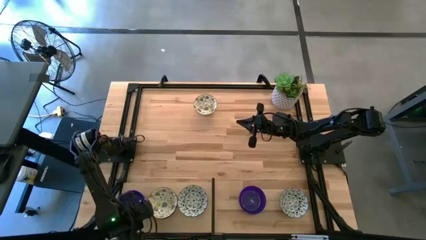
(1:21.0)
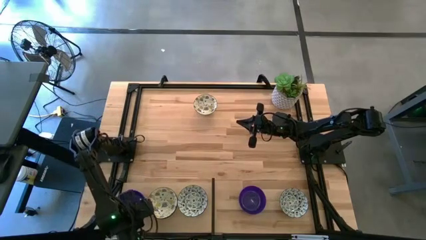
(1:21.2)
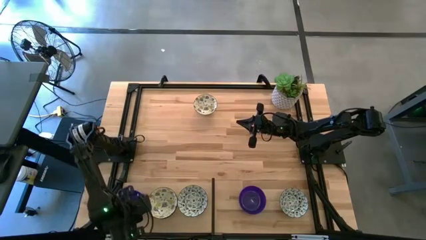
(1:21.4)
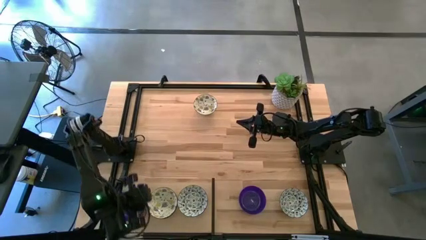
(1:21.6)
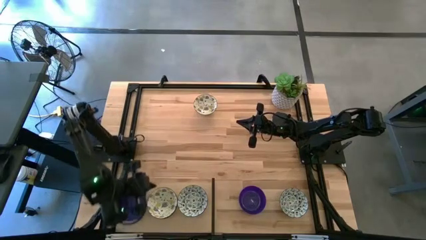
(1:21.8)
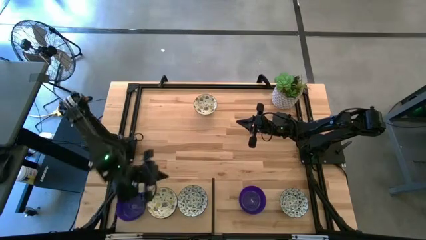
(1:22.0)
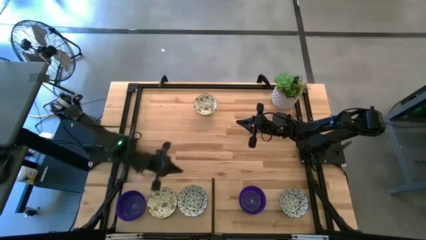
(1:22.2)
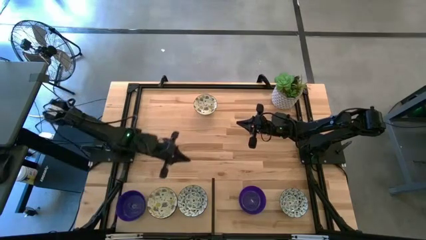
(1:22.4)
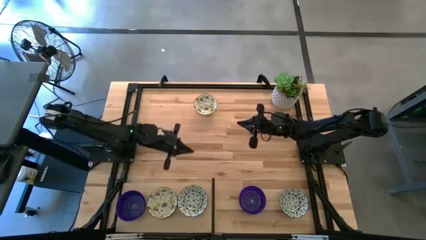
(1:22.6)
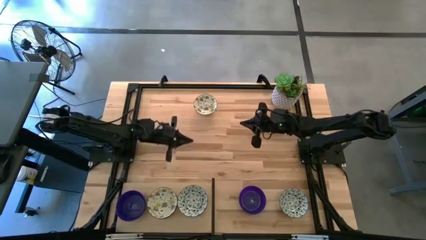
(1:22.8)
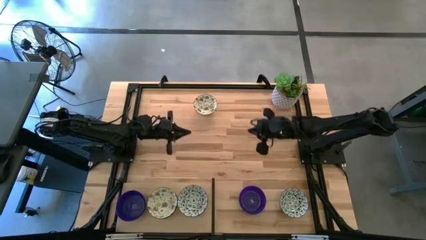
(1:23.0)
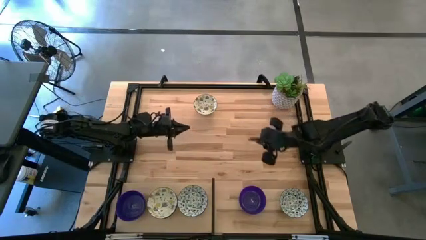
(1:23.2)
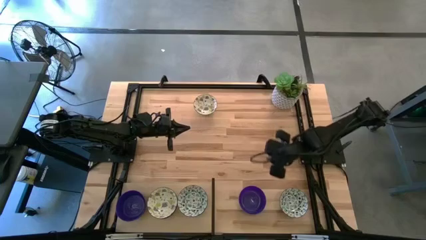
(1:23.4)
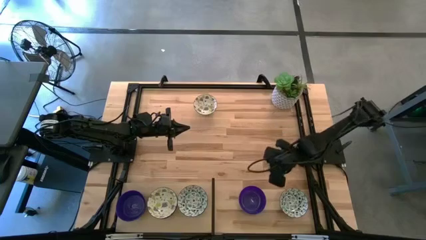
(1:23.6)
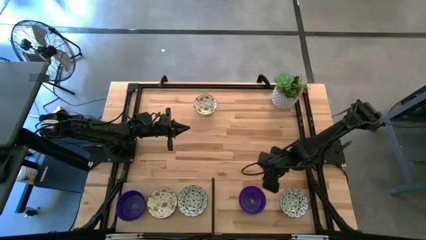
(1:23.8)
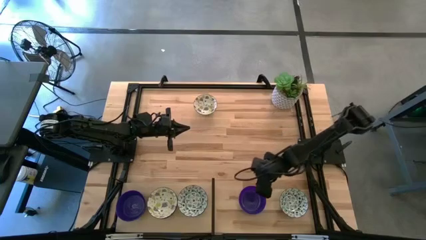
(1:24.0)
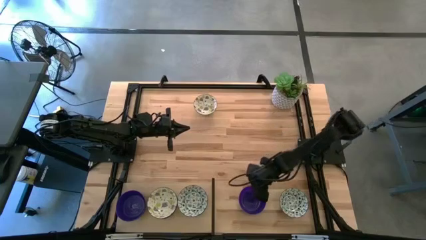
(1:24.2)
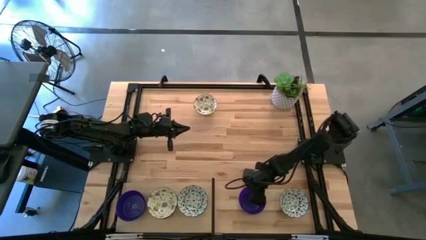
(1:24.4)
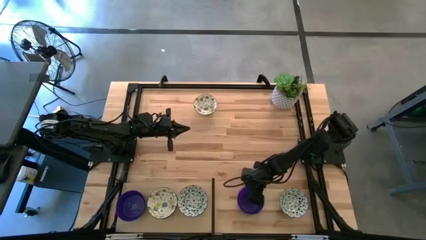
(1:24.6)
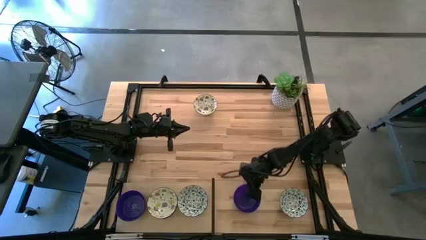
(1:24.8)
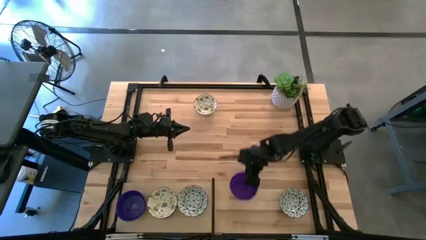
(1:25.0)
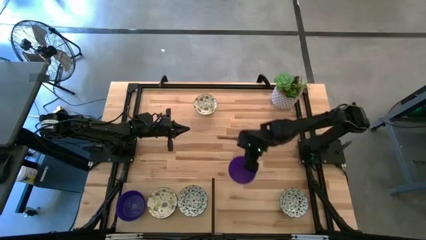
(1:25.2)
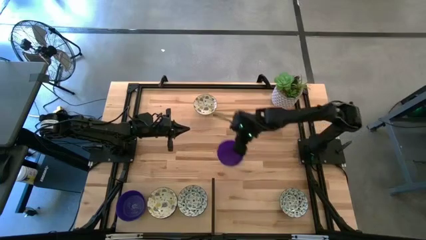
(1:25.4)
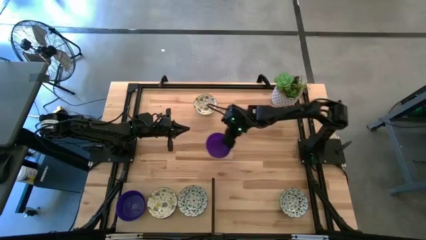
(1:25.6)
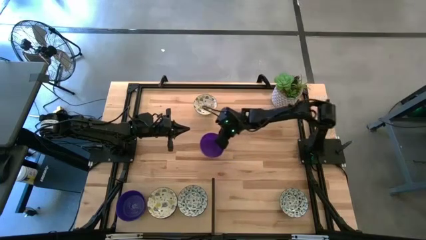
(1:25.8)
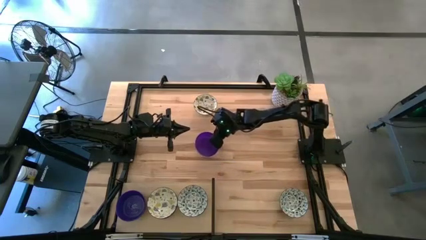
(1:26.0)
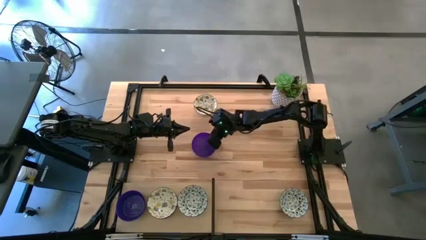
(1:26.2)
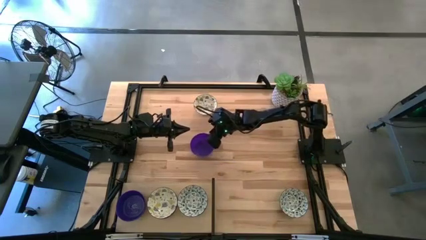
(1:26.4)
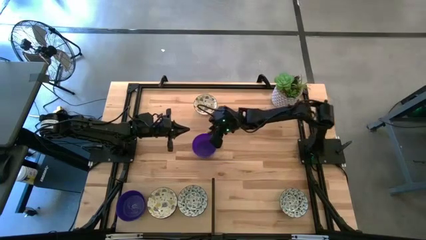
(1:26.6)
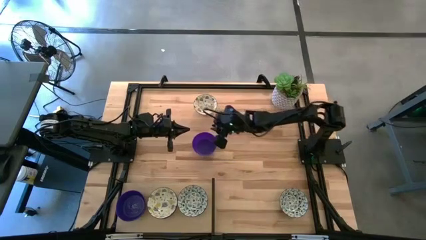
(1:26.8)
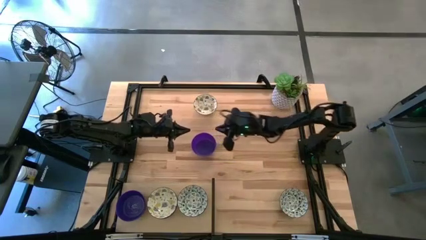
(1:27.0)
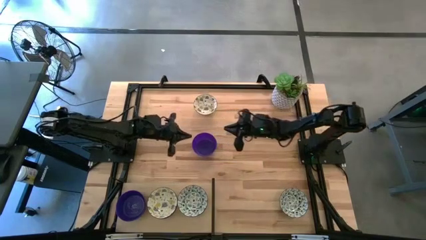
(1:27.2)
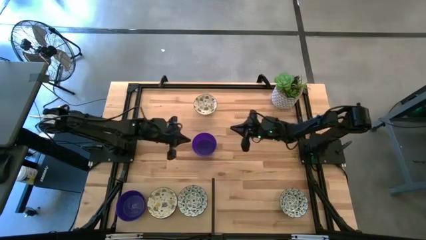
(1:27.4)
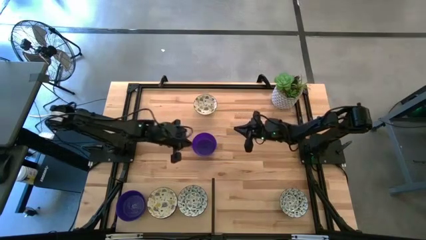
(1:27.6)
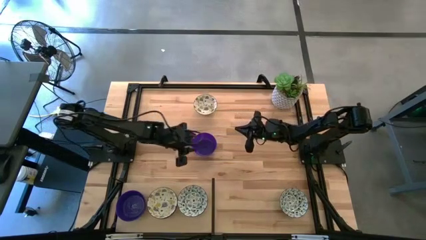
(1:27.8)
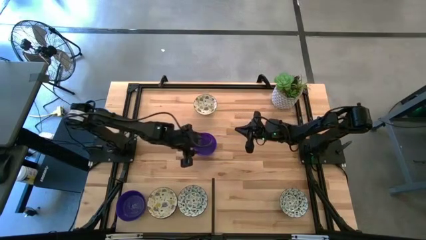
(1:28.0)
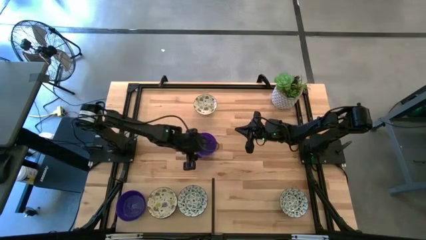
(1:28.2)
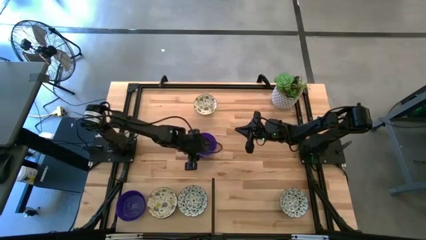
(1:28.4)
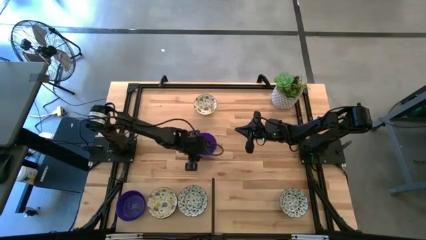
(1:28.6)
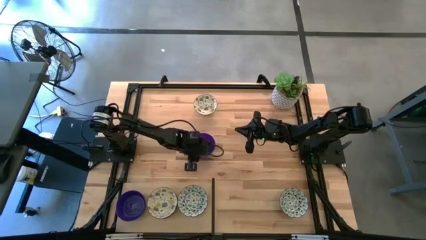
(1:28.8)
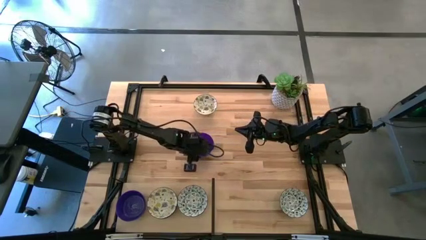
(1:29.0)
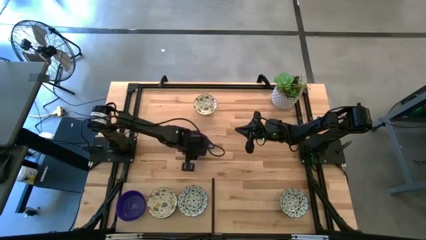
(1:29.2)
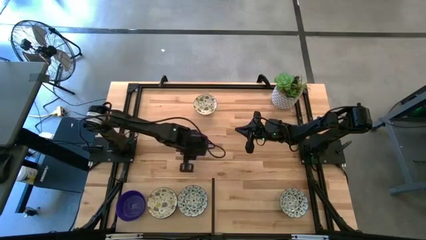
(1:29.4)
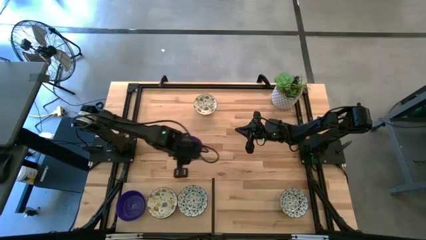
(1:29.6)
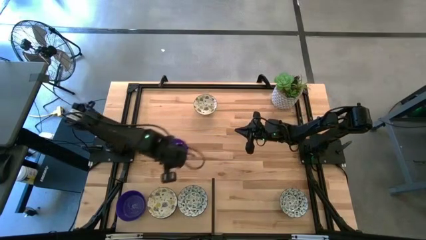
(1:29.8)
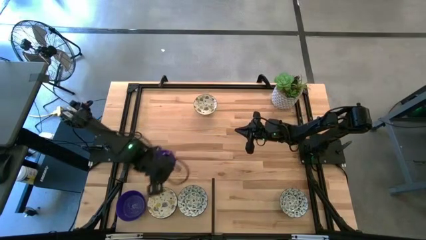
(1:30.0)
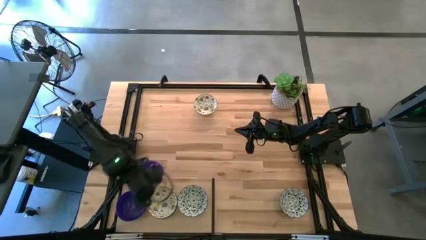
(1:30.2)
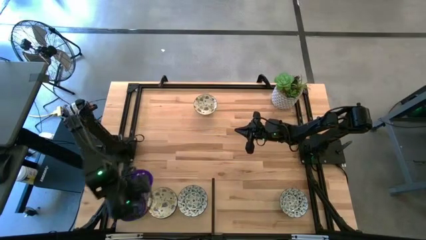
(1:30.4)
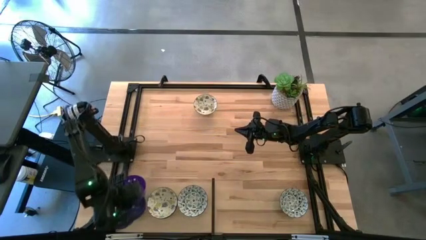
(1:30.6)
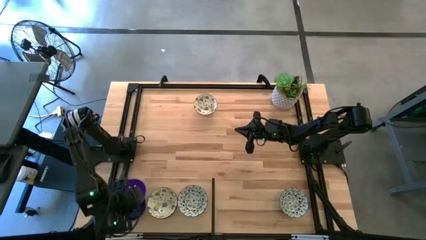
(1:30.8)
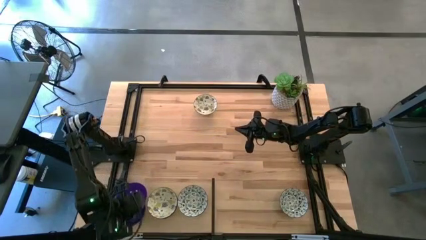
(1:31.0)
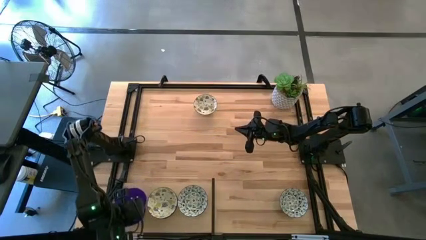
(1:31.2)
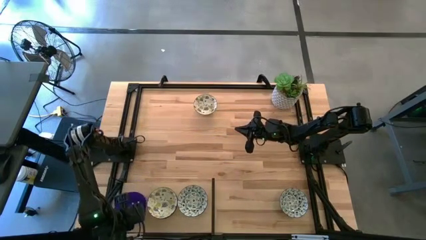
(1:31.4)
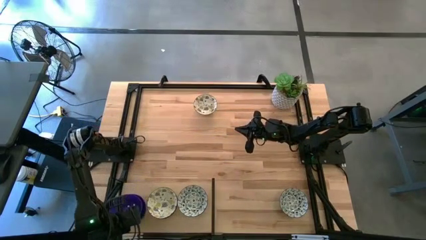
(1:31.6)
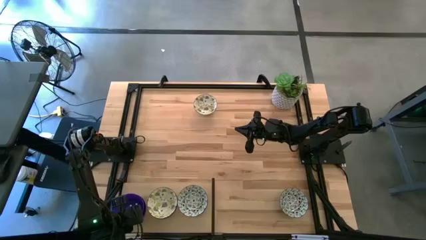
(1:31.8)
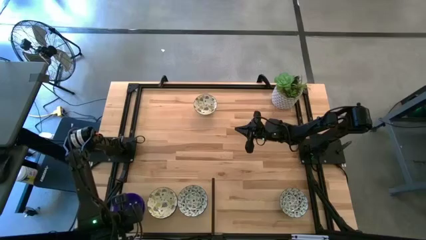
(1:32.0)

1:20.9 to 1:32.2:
Task: Pick & Place Mini bowls
Stack the violet bowl on top of the other stacked violet bowls on the shelf

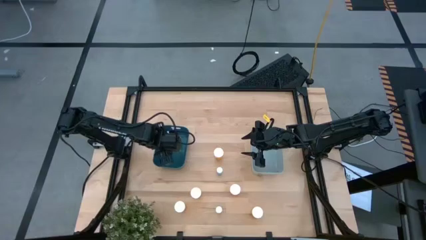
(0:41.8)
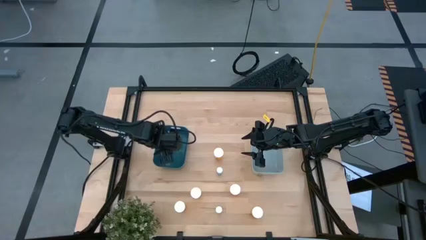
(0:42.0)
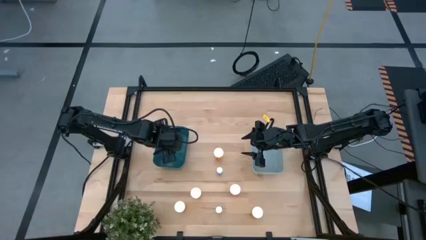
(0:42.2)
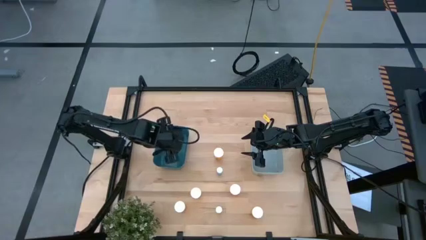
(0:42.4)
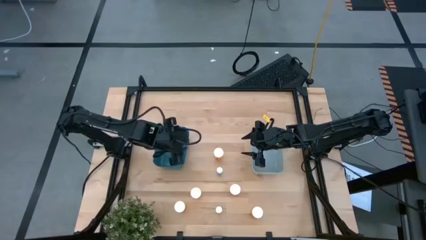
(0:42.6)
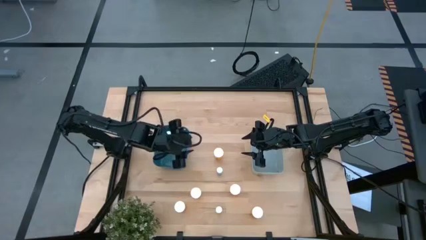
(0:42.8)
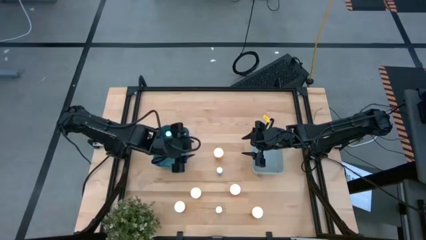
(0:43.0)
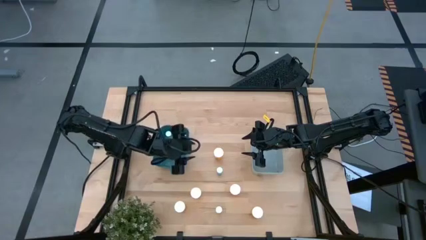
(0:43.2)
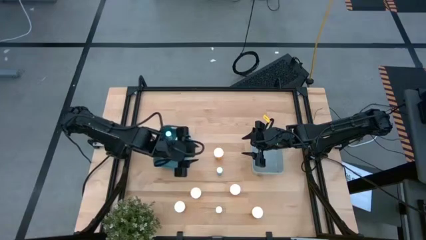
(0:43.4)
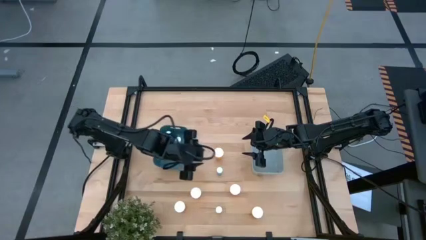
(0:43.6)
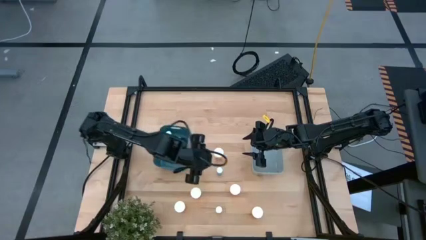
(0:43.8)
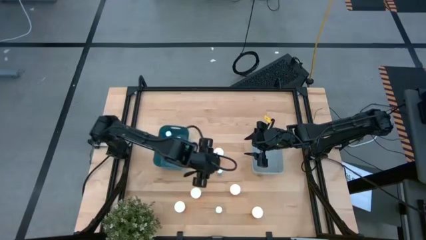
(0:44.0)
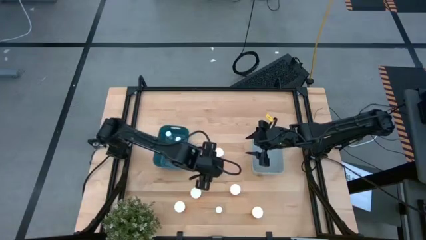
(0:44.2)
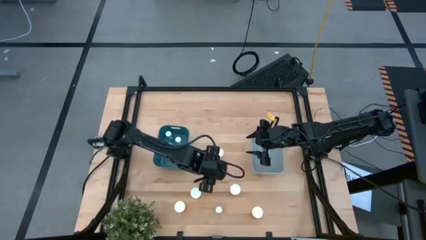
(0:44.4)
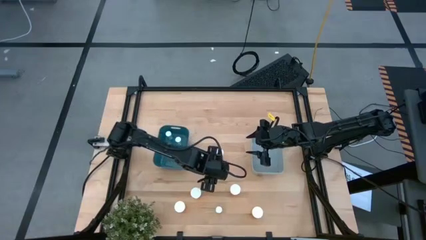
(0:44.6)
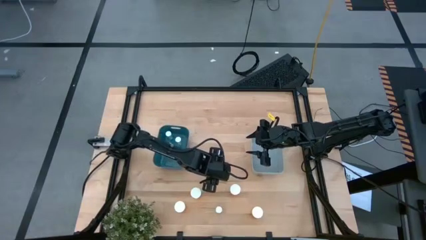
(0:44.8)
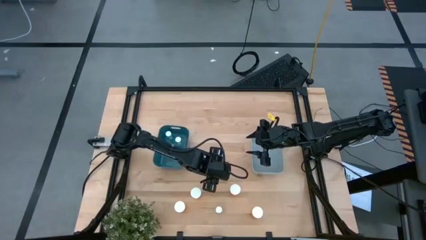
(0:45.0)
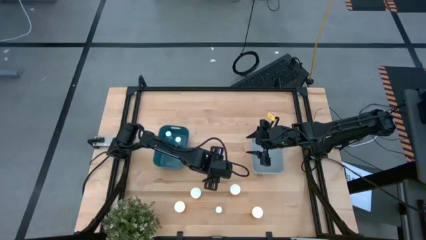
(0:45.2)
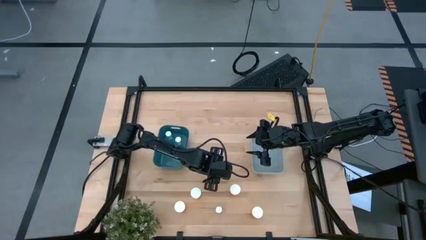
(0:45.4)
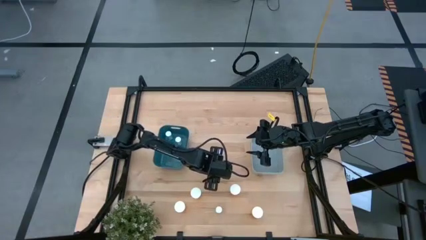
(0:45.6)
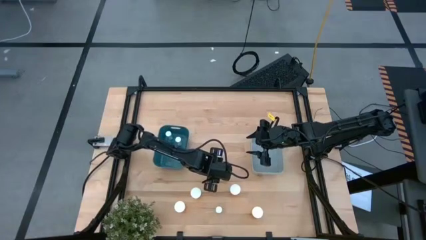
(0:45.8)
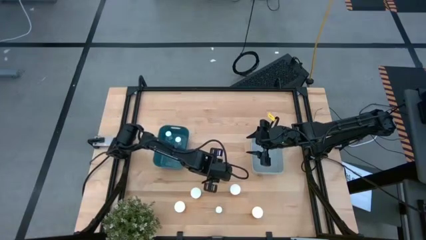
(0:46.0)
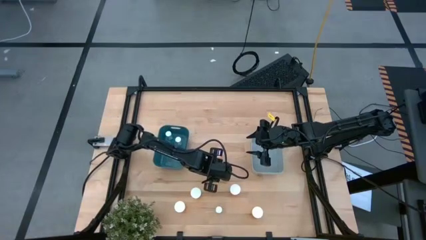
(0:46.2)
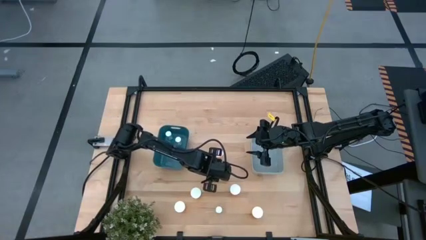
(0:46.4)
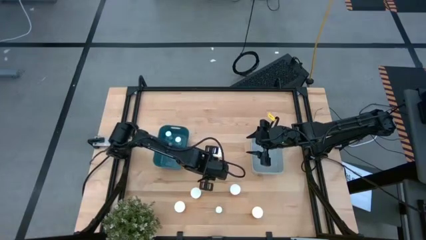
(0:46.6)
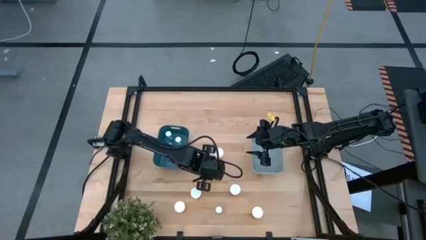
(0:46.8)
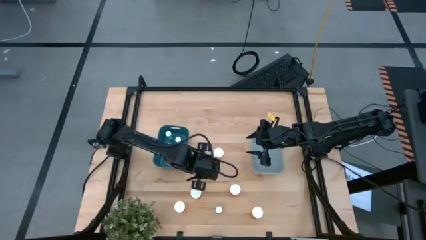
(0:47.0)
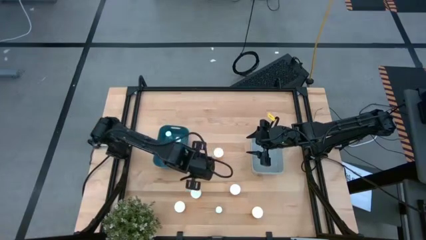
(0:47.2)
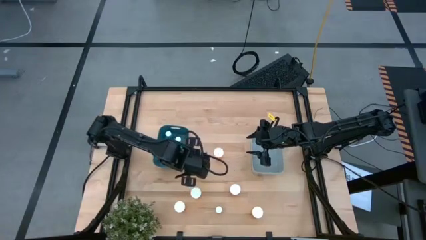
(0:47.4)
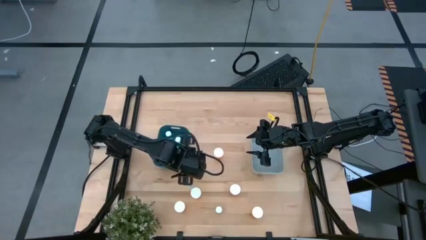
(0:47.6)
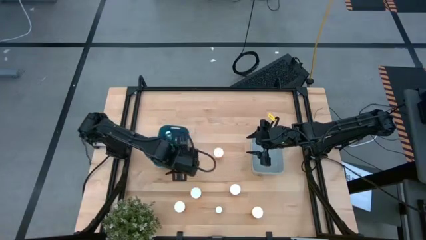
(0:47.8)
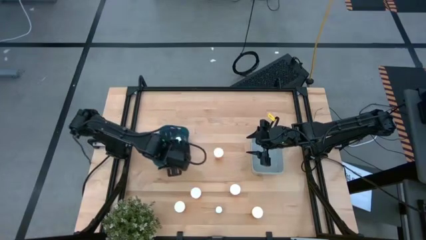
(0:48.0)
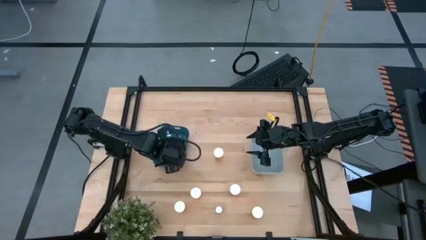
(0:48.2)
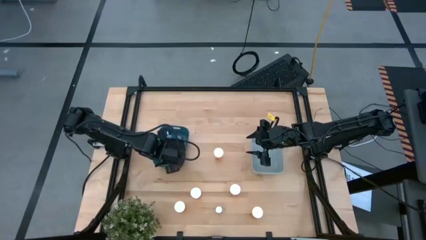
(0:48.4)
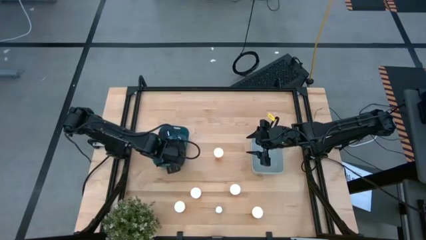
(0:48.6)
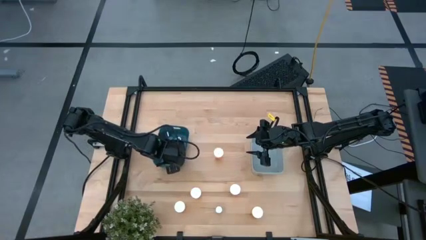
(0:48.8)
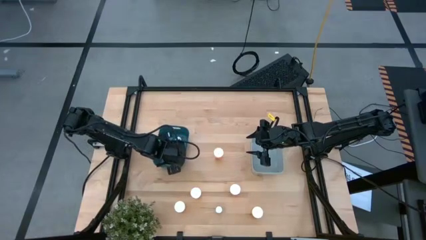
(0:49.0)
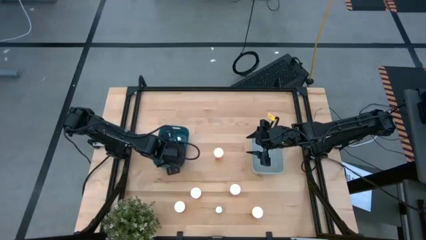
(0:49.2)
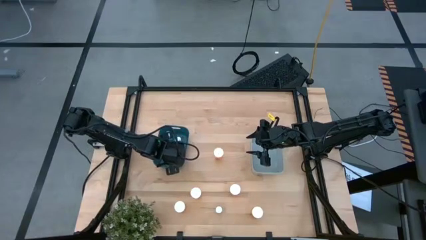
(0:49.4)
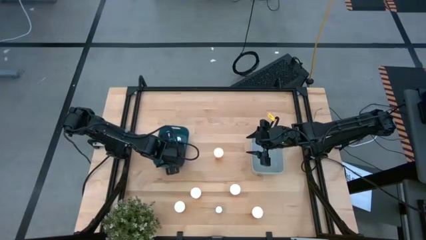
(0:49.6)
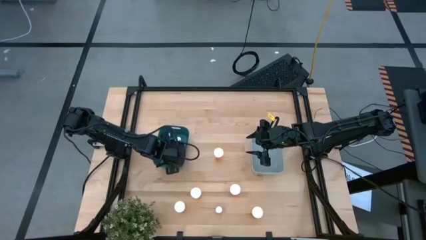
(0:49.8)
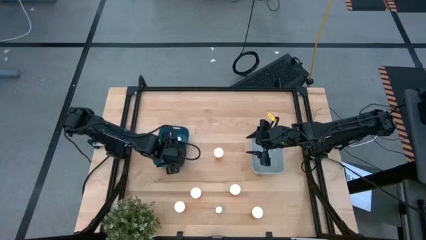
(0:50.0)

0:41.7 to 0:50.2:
Task: Pick and place medicine bottles into bin by pill shape (circle, oval)
Put the blue pill bottle into the blue bin
